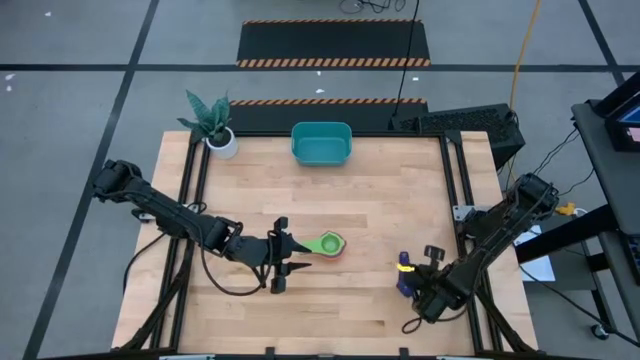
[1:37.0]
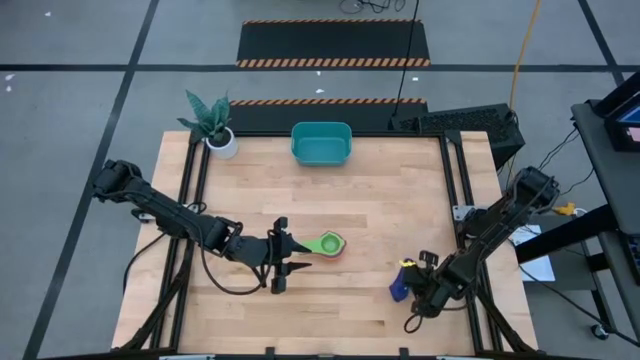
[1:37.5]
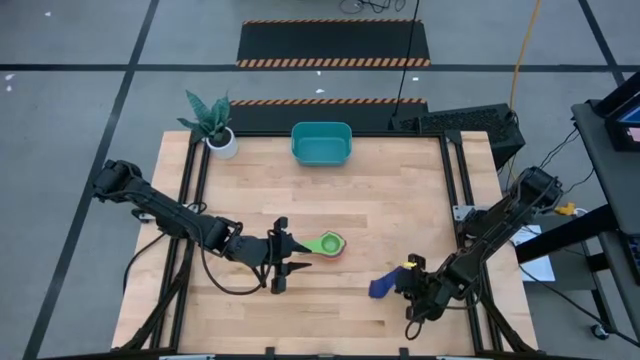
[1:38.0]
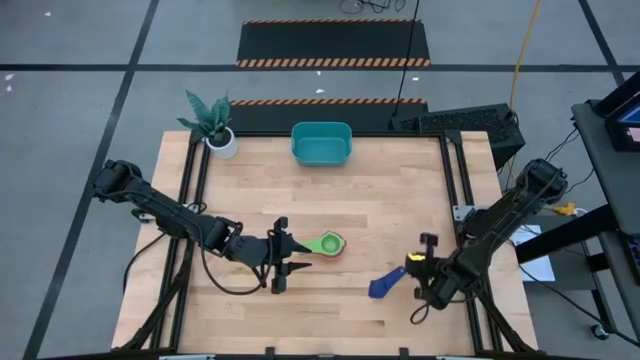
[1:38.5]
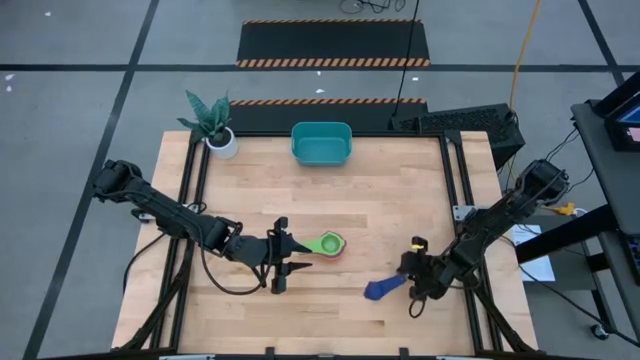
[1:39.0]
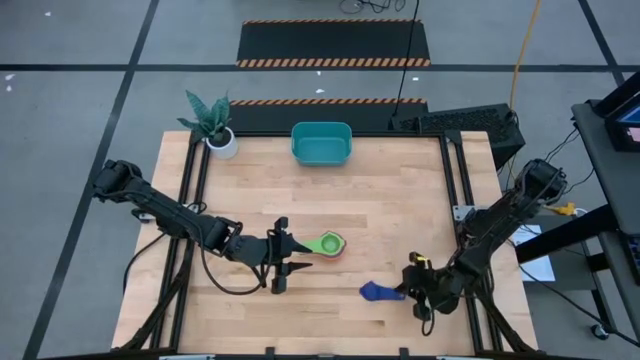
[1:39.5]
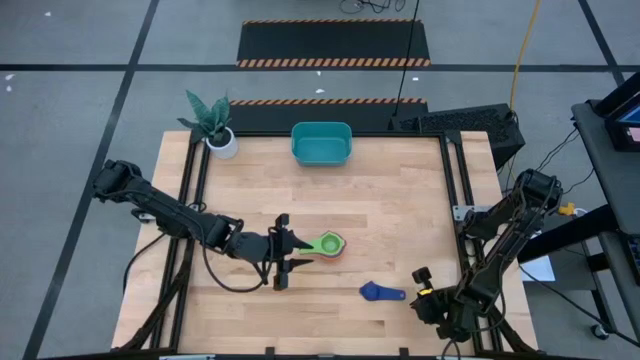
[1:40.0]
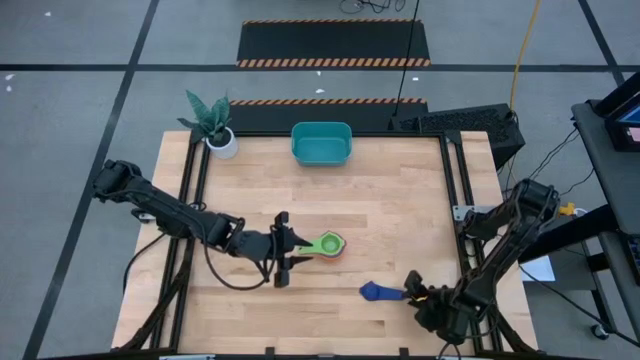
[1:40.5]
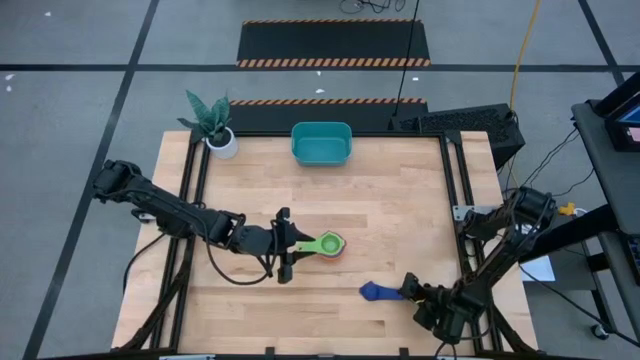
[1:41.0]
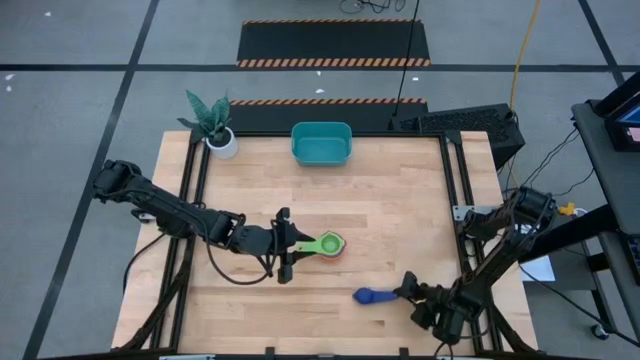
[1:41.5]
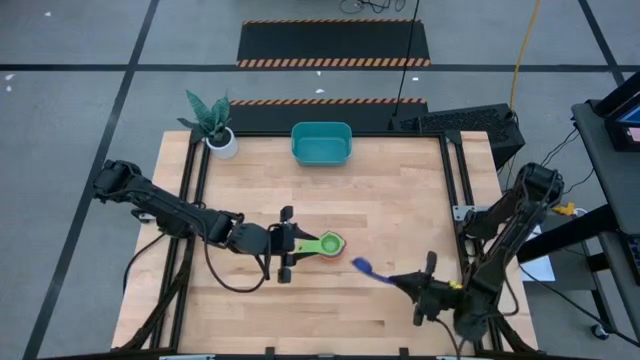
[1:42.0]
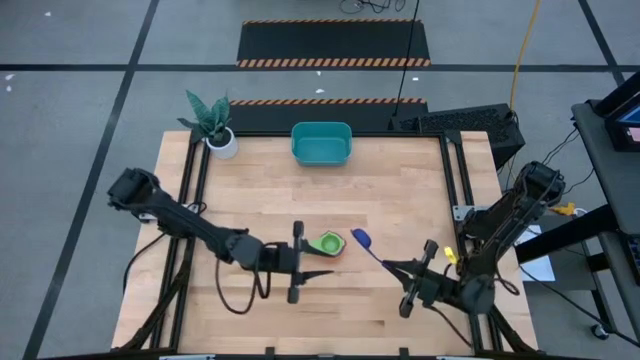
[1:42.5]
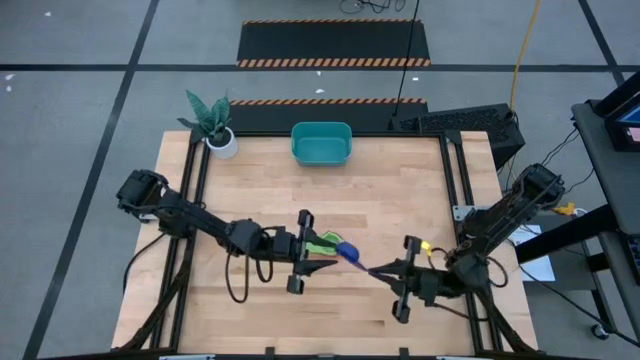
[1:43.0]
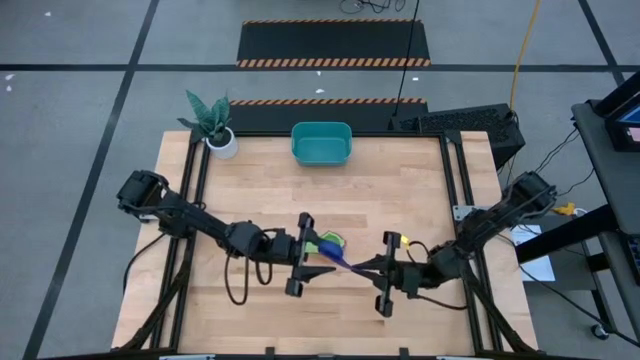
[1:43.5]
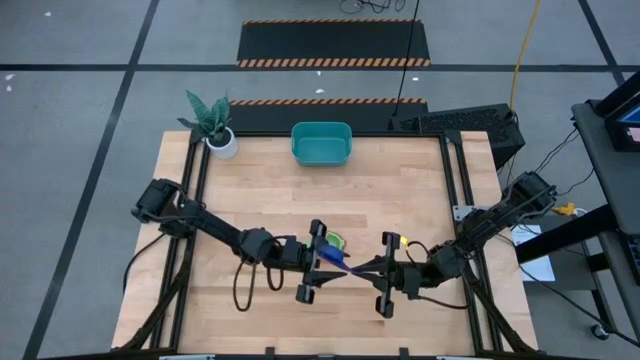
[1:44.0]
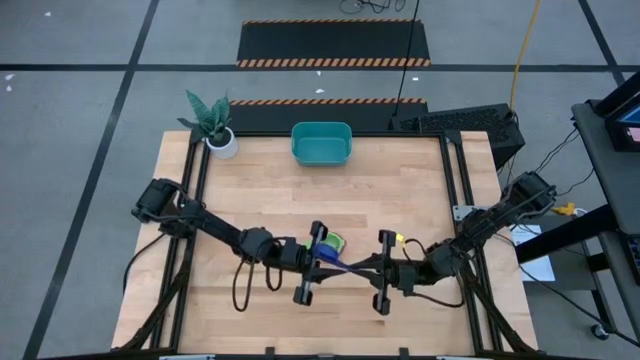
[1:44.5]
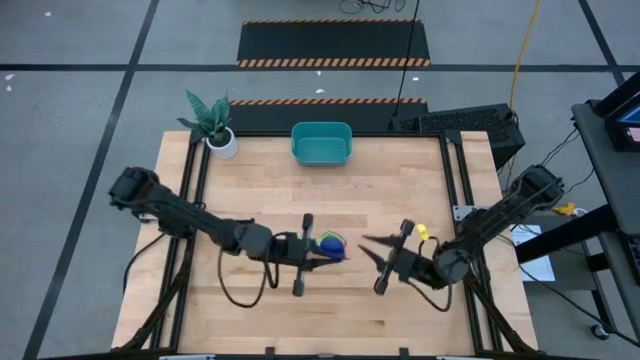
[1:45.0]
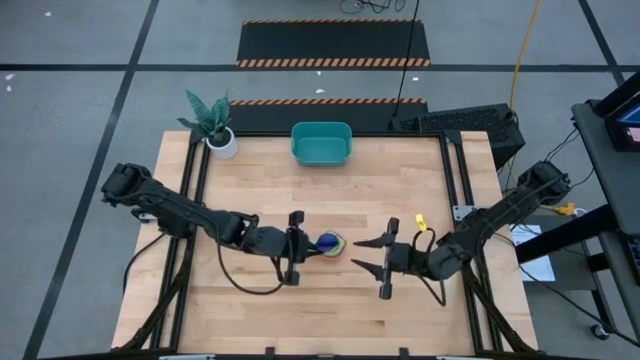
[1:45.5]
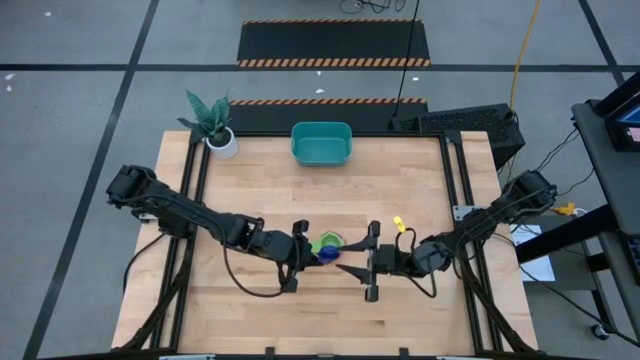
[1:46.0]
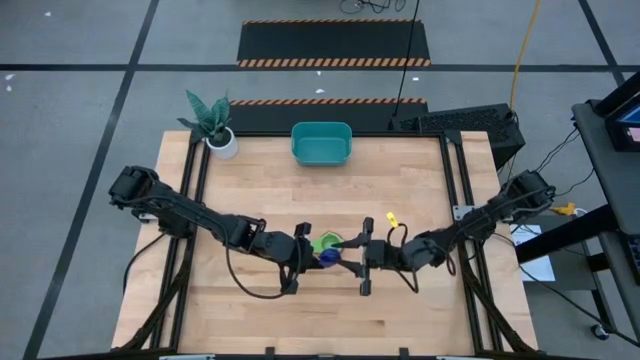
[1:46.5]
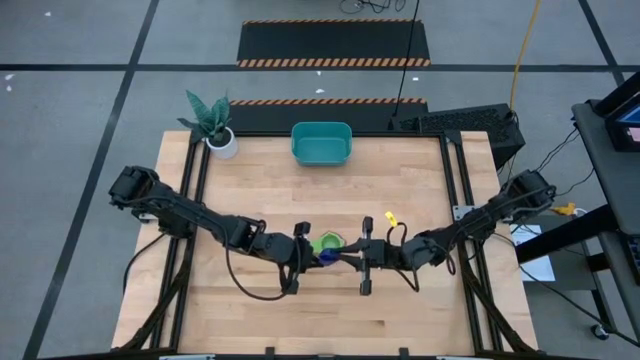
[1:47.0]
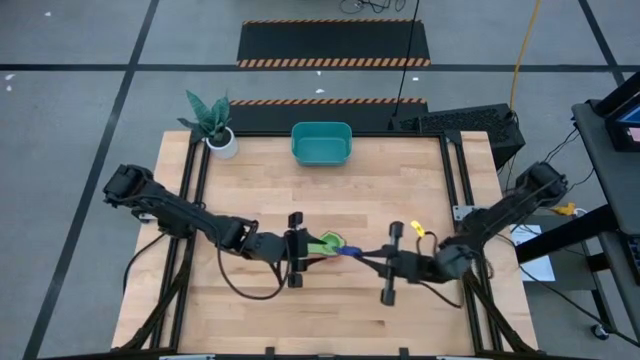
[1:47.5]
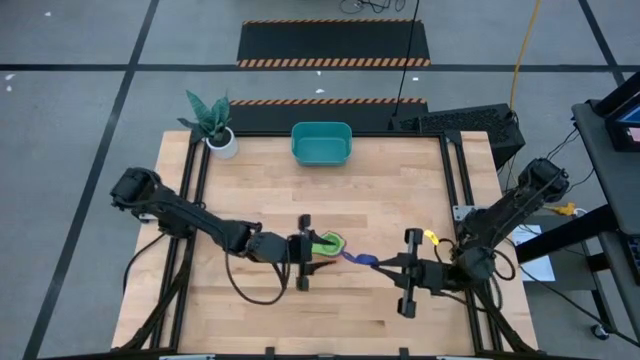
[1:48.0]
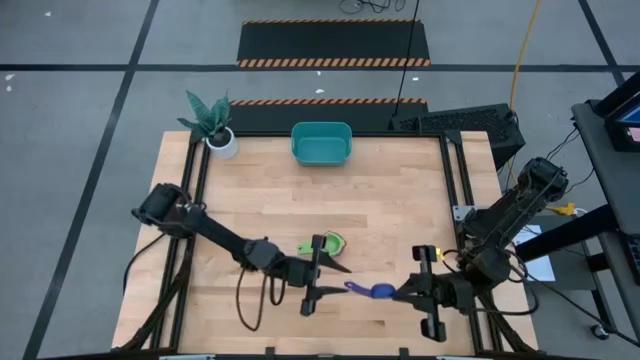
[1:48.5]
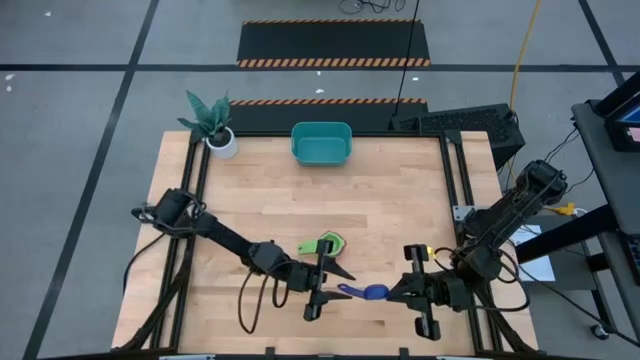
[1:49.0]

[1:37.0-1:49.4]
Task: Nest measuring cups in basket
Stack the dark blue measuring cup on top of the green measuring cup

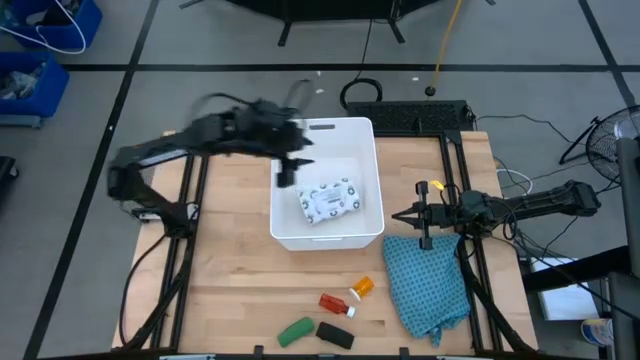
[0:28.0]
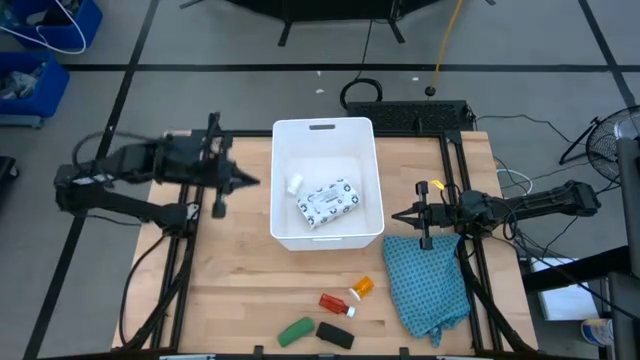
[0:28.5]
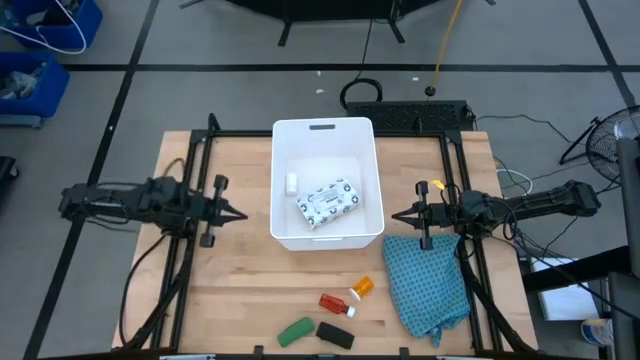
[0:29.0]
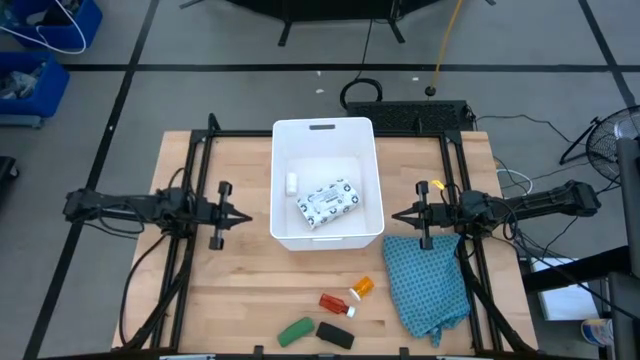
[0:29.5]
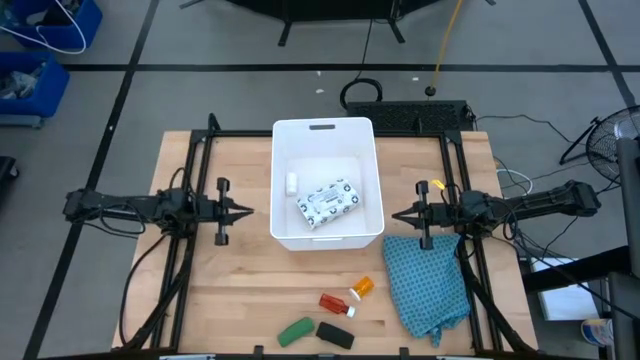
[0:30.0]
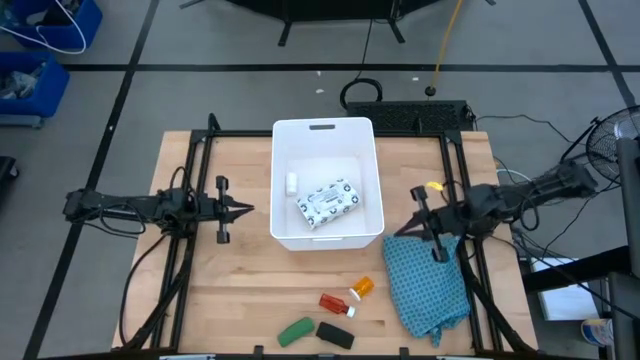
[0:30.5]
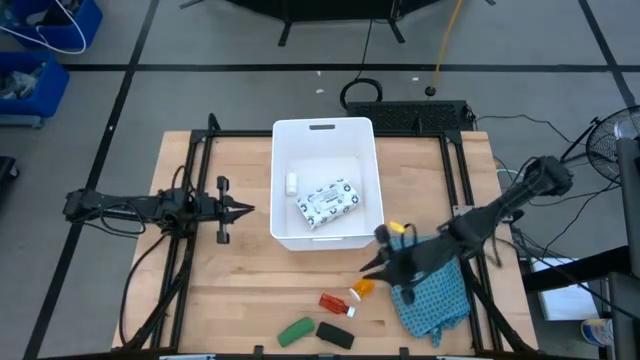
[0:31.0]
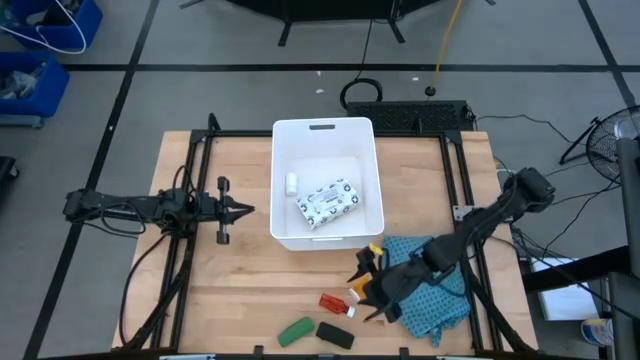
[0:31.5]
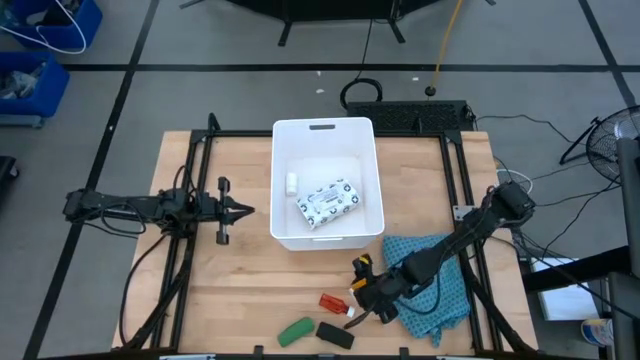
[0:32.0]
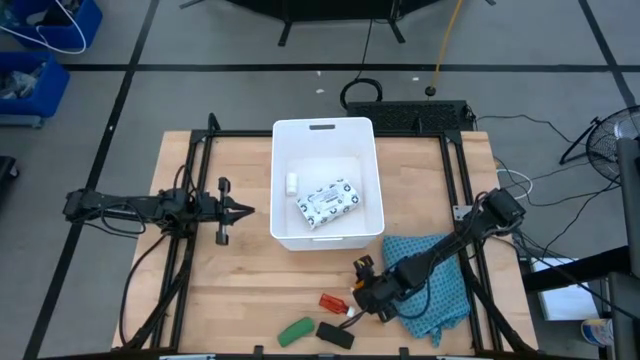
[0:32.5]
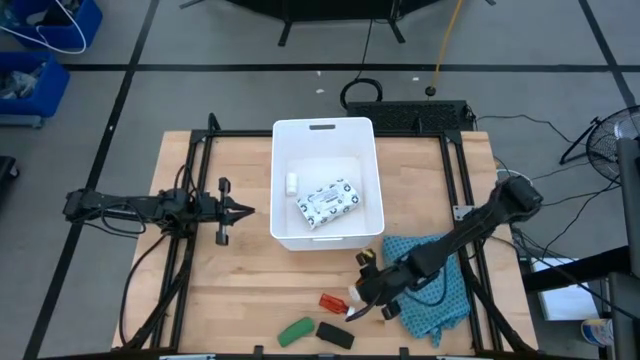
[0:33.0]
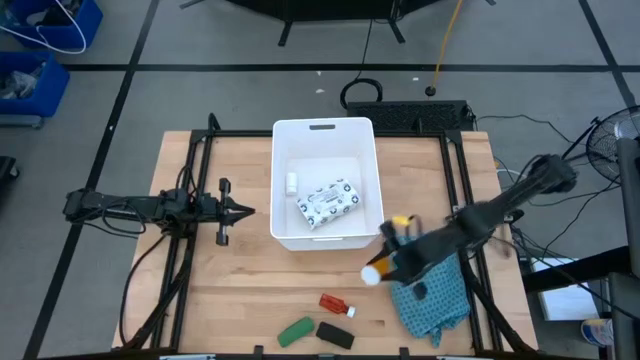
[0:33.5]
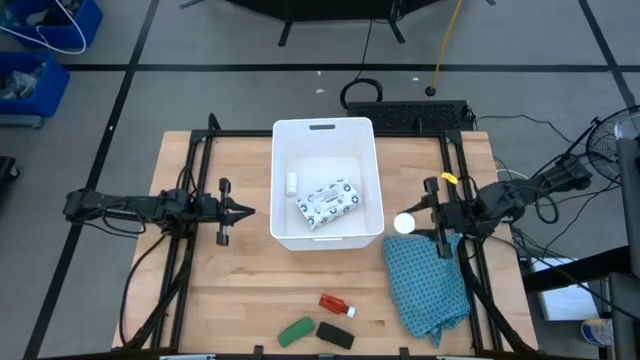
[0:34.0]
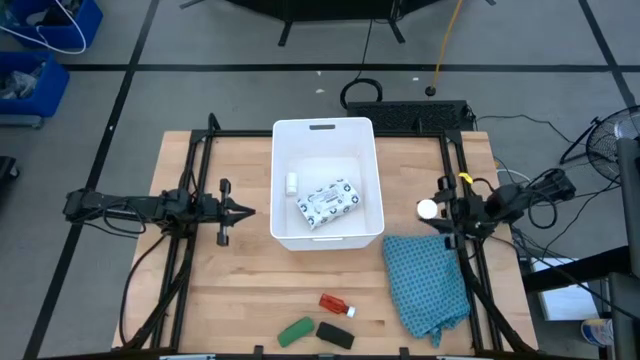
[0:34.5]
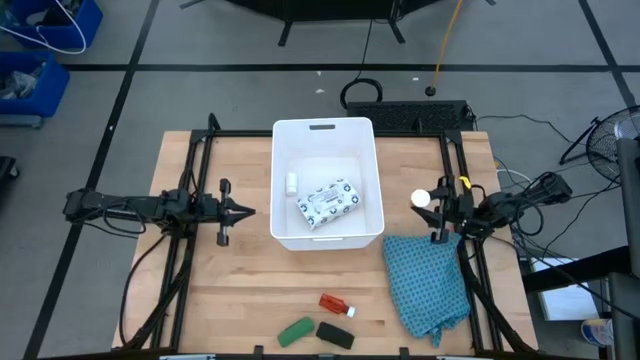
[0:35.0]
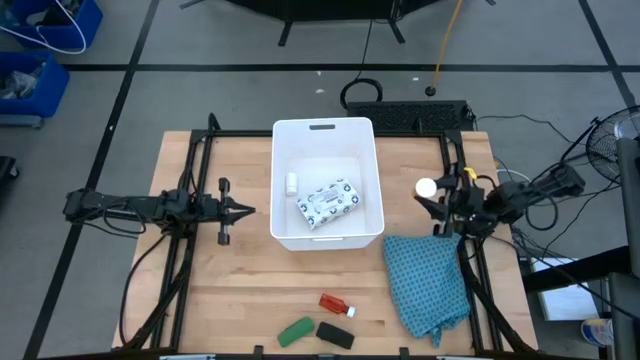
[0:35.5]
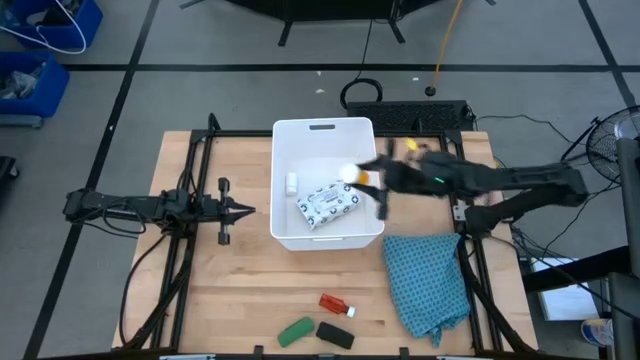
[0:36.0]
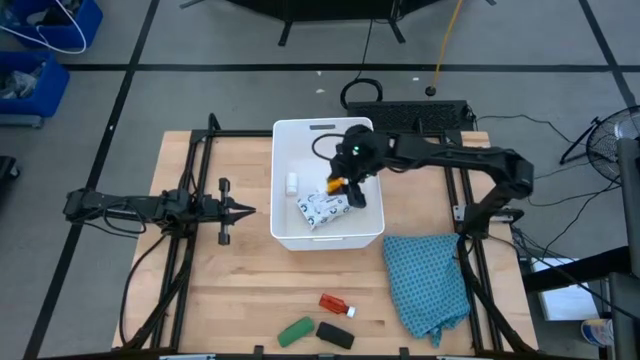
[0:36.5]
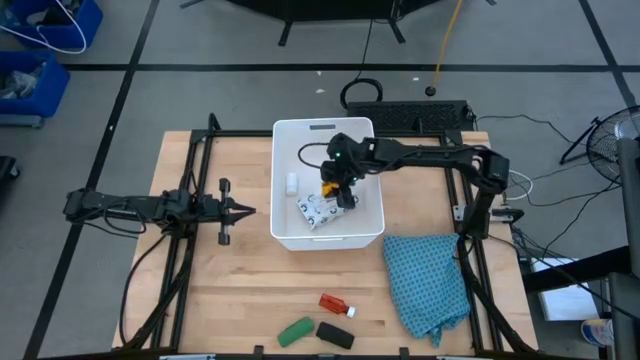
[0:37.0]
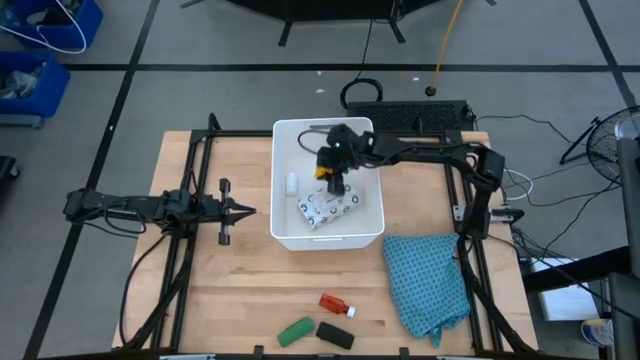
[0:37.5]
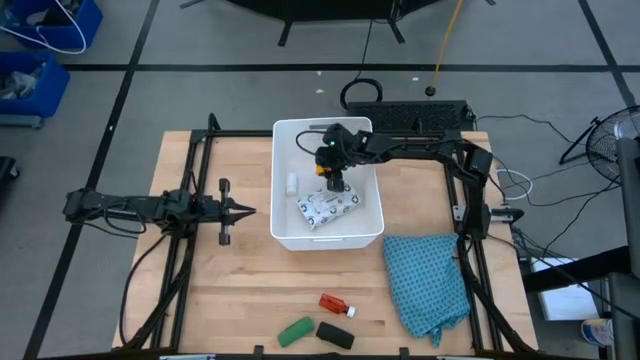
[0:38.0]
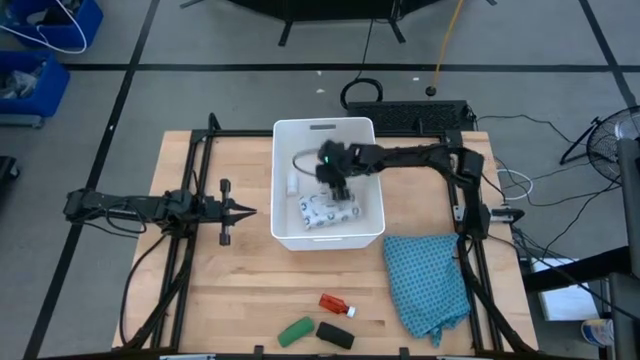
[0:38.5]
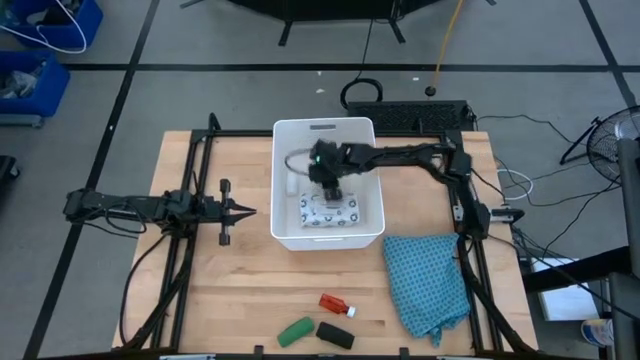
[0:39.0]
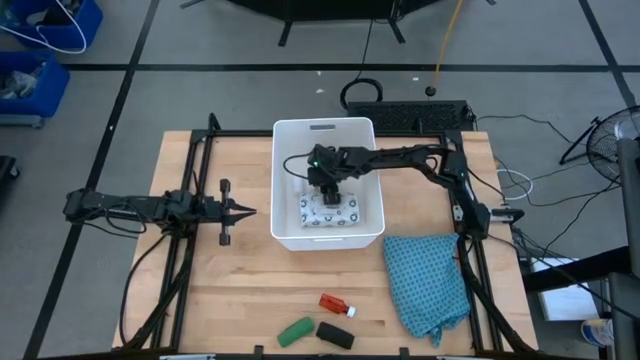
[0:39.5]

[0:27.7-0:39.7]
Task: Pick & place medical supplies in basket/bin
Put the orange medicine bottle into the white bin
